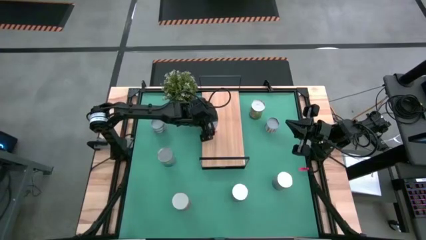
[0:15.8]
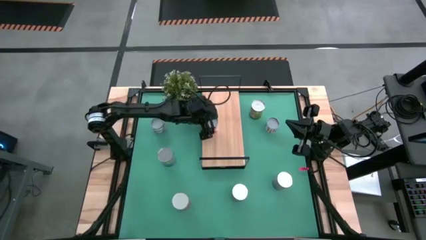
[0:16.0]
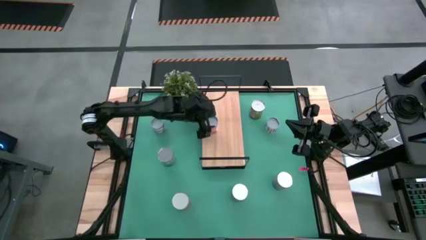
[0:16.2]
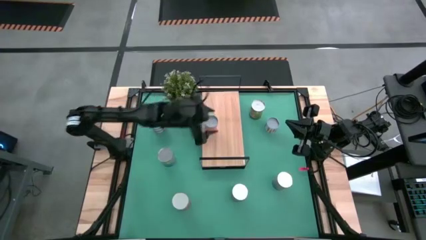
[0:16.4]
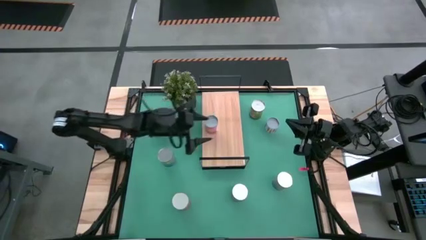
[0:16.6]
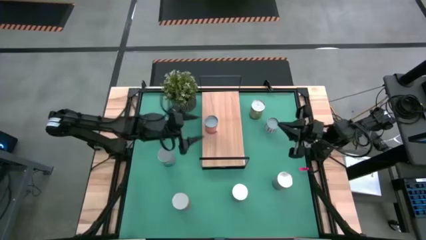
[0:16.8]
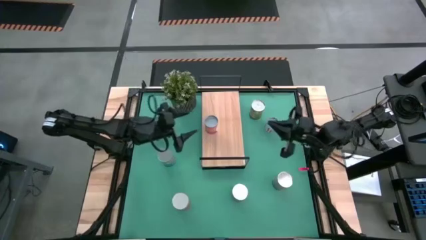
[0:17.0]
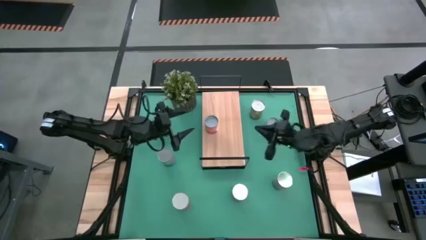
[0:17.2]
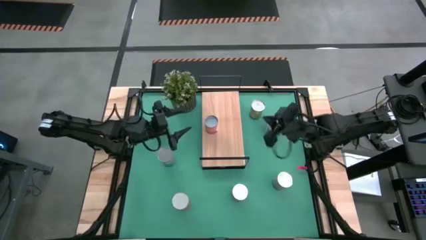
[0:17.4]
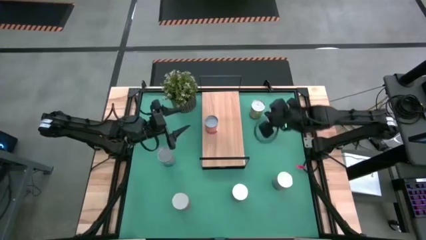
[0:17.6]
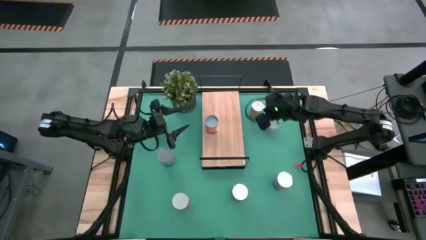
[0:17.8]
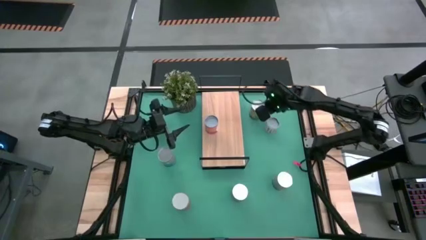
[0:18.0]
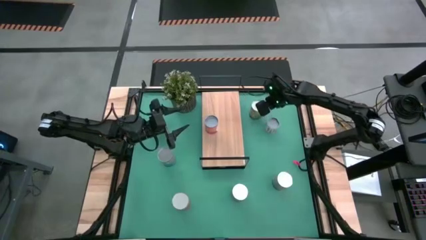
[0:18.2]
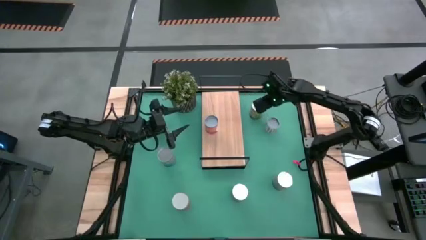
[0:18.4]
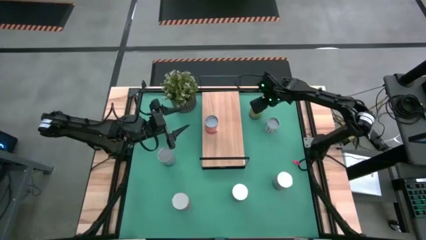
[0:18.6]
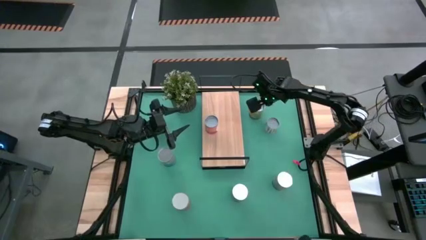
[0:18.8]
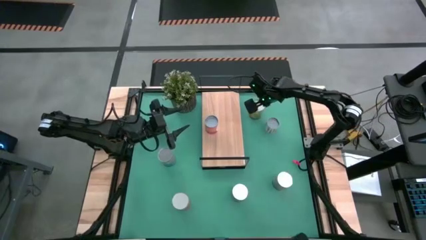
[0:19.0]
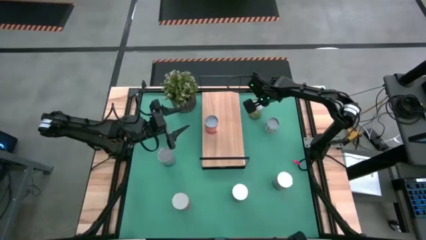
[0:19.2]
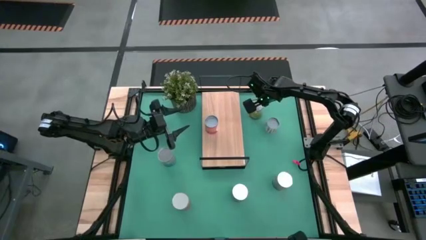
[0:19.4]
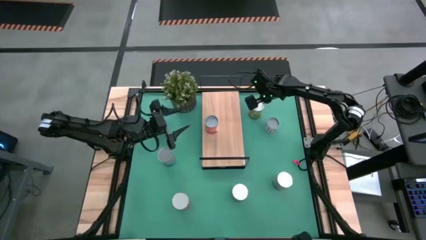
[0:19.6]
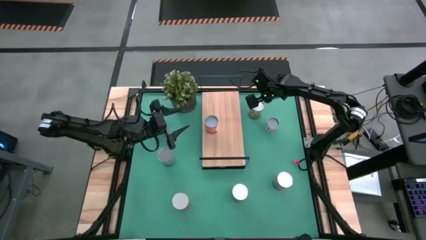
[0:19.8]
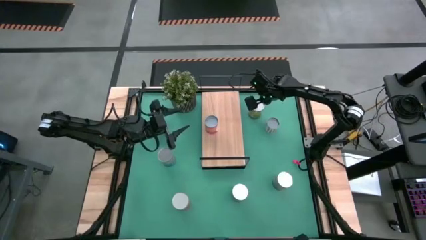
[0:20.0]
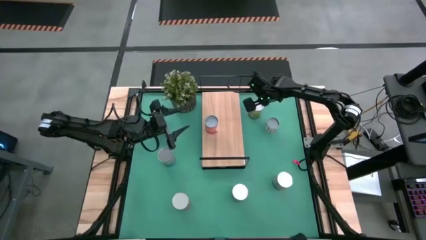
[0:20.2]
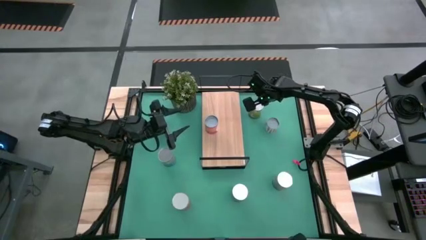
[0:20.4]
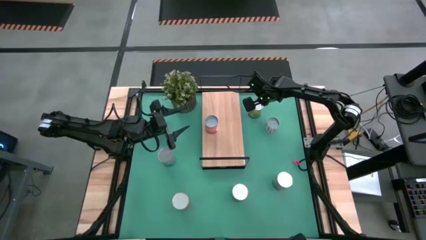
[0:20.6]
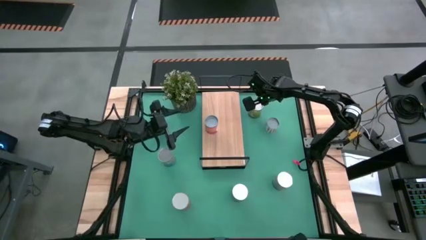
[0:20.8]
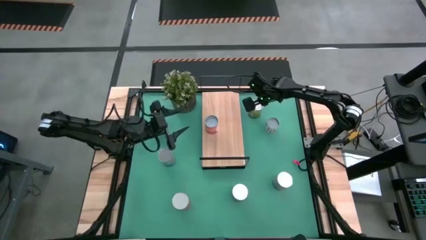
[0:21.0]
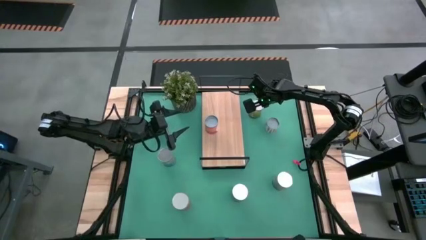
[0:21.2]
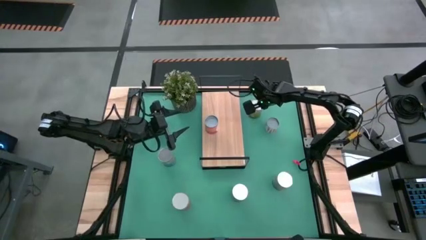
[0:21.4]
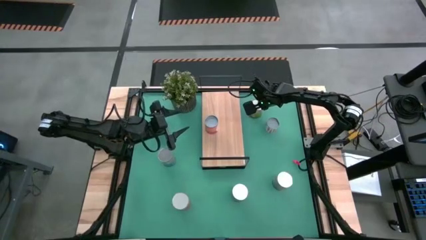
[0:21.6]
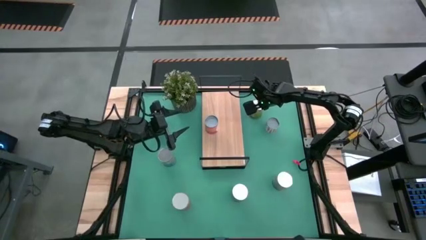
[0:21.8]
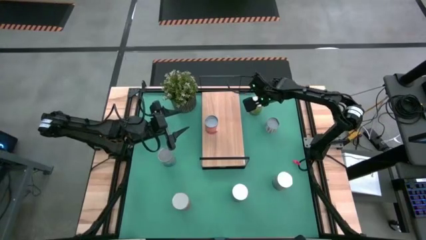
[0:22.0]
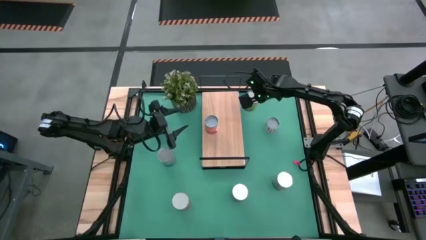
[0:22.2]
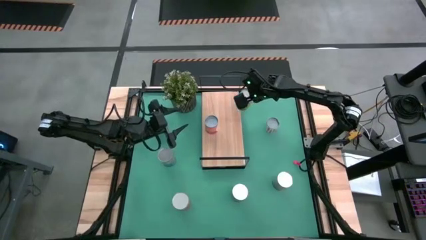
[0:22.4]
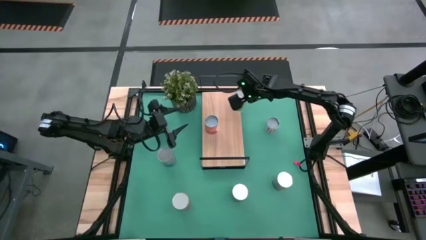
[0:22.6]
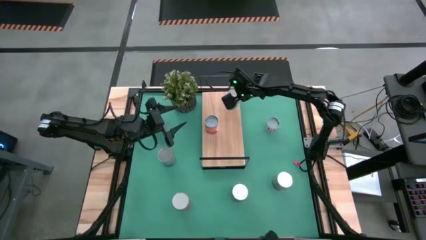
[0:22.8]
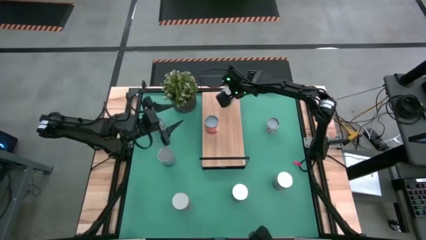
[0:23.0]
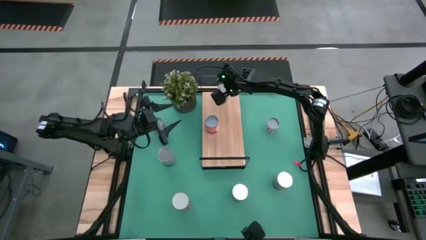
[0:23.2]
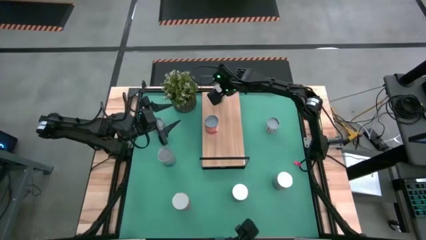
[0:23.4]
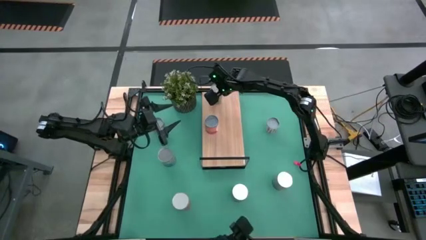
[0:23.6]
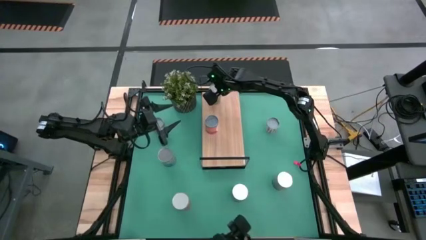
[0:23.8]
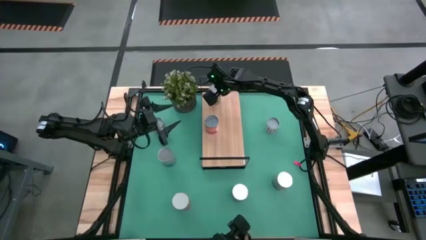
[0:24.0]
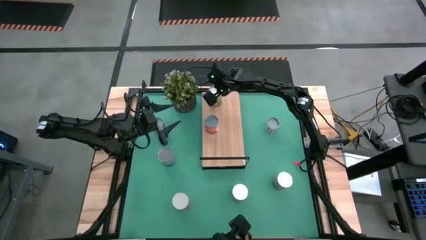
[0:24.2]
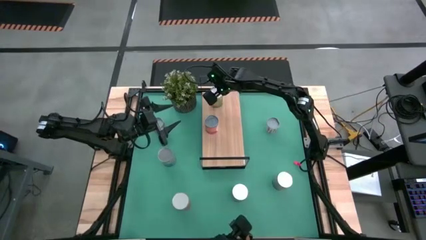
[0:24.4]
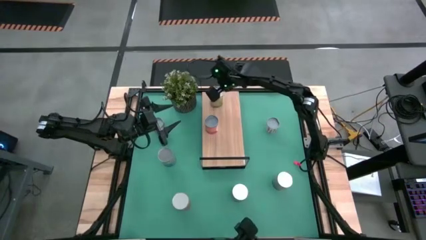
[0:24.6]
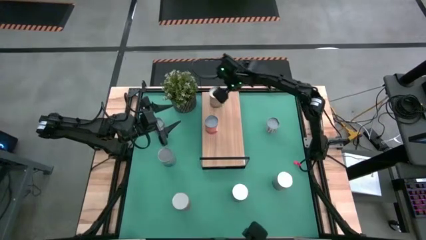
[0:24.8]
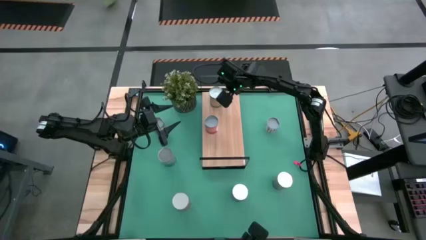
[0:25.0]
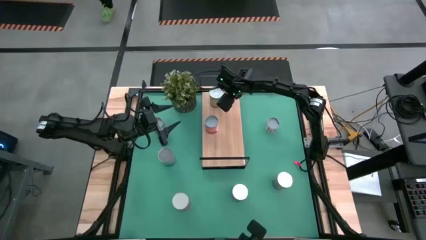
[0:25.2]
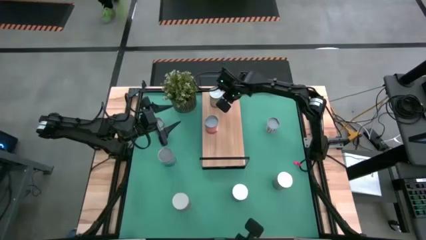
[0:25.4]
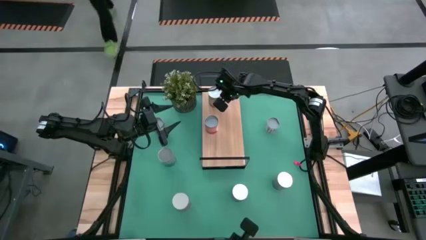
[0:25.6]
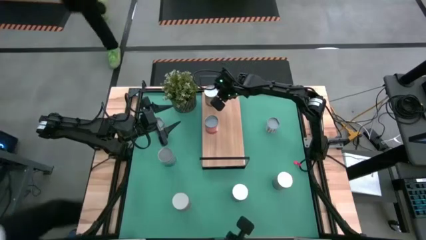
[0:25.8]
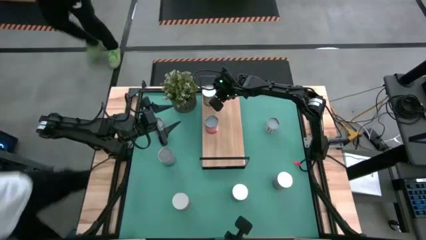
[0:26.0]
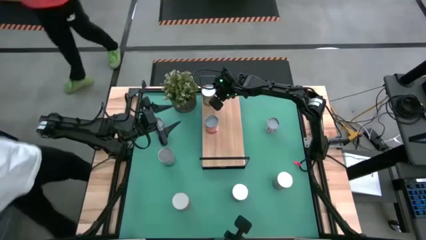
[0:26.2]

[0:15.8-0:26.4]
Task: Pick and place cans onto a shelf
Put the canned mangos on the shelf

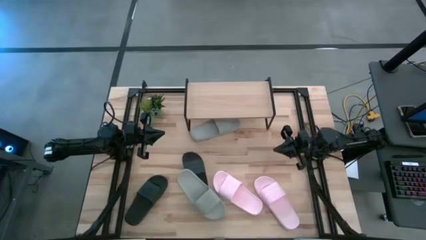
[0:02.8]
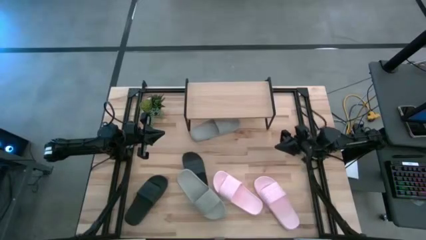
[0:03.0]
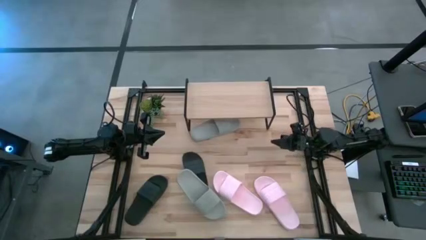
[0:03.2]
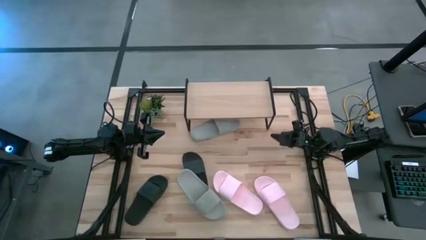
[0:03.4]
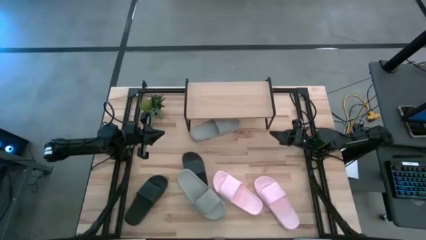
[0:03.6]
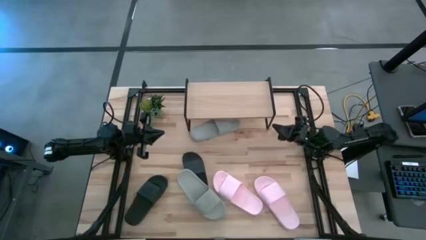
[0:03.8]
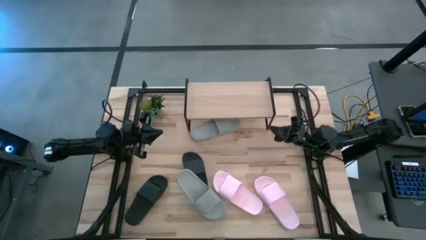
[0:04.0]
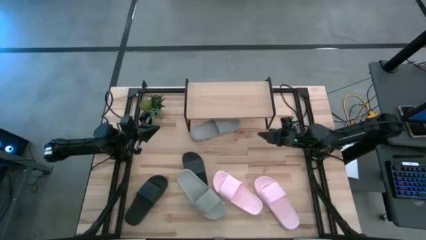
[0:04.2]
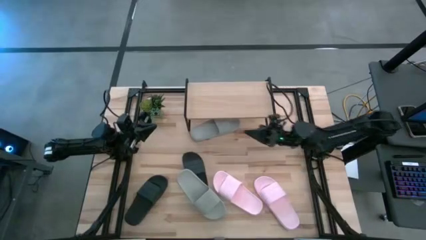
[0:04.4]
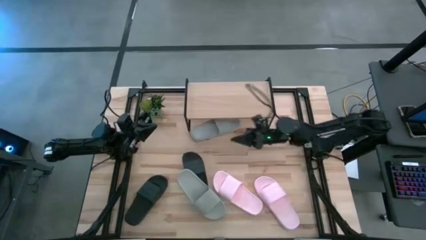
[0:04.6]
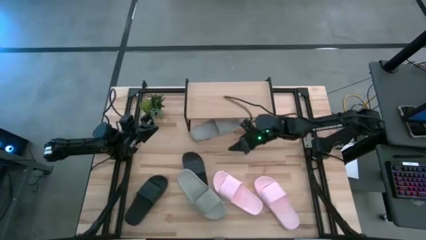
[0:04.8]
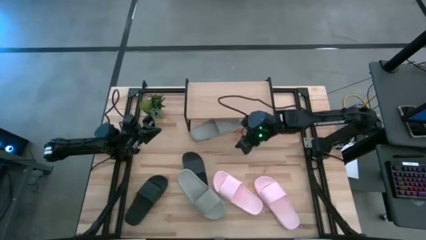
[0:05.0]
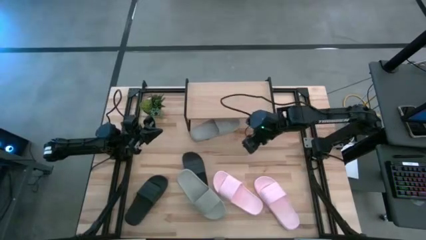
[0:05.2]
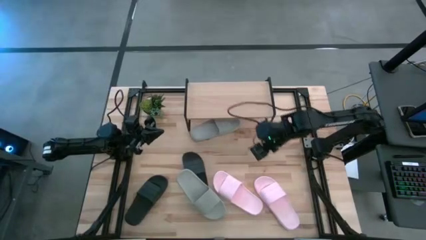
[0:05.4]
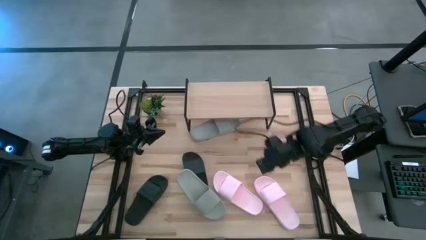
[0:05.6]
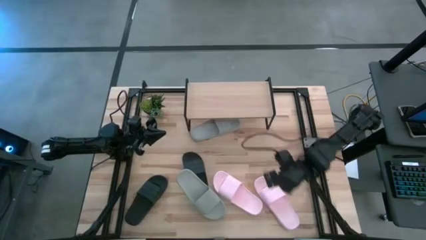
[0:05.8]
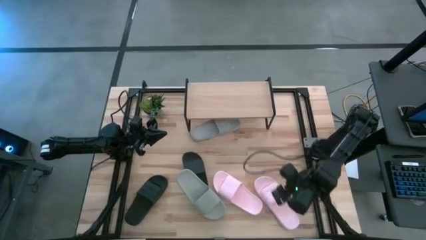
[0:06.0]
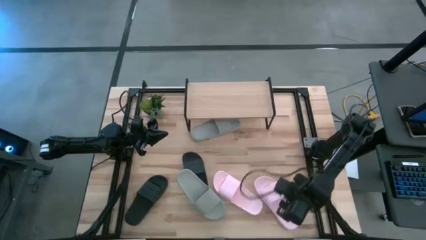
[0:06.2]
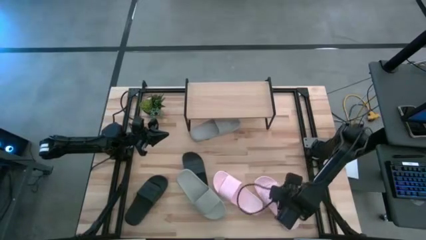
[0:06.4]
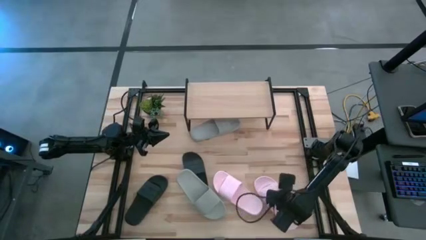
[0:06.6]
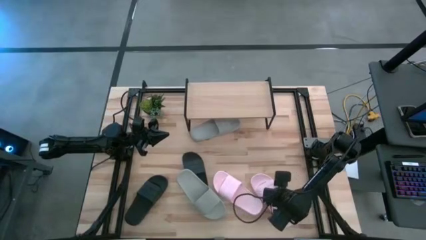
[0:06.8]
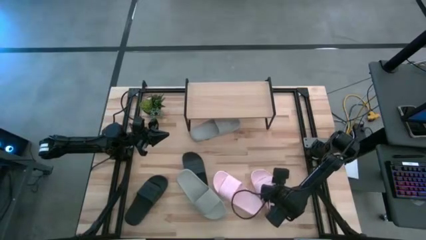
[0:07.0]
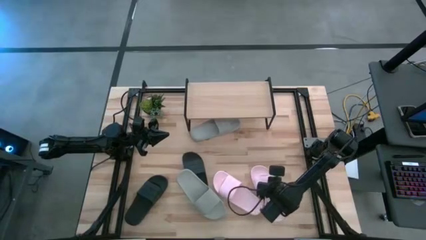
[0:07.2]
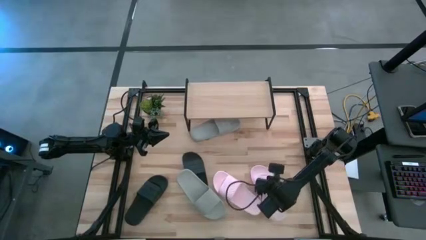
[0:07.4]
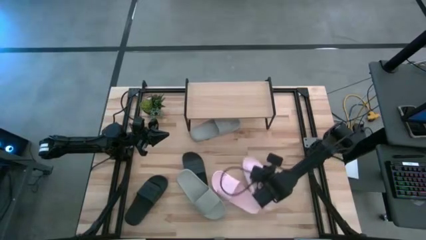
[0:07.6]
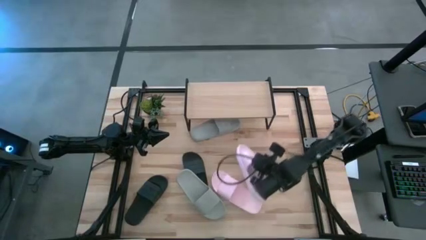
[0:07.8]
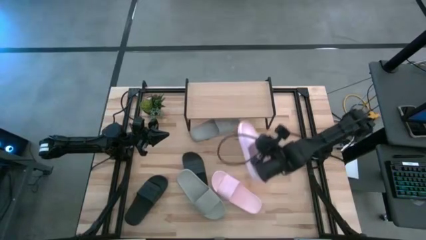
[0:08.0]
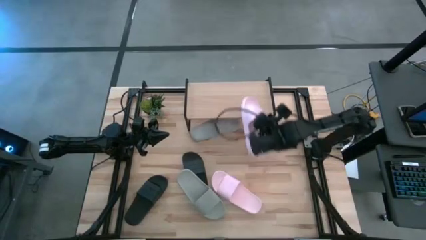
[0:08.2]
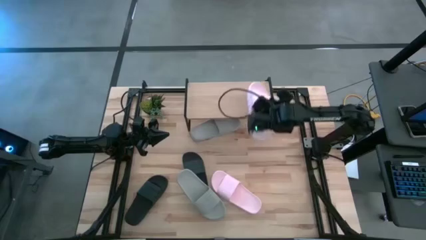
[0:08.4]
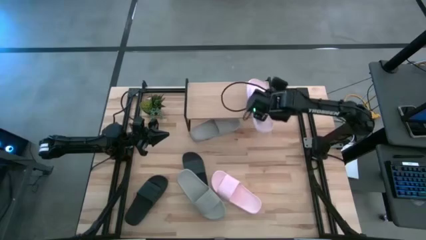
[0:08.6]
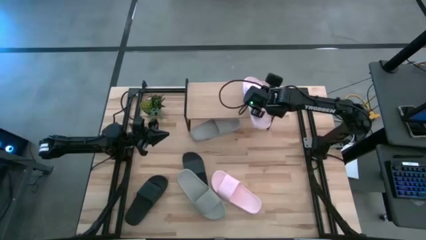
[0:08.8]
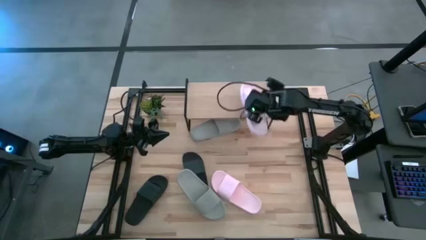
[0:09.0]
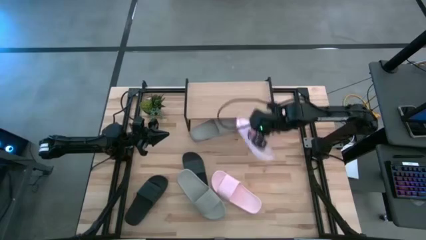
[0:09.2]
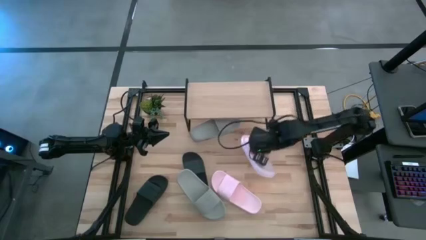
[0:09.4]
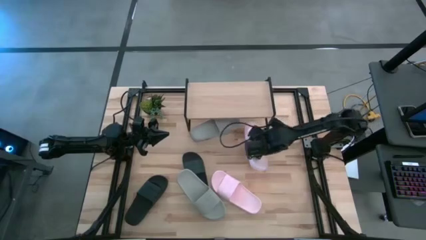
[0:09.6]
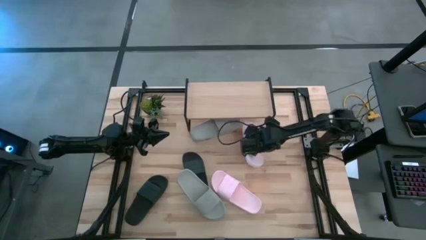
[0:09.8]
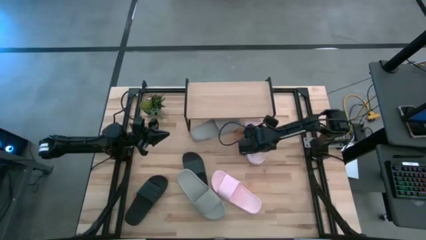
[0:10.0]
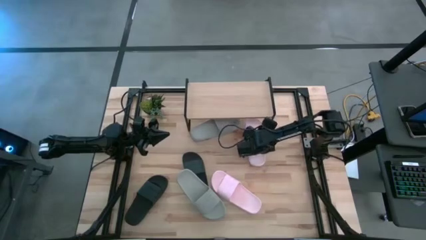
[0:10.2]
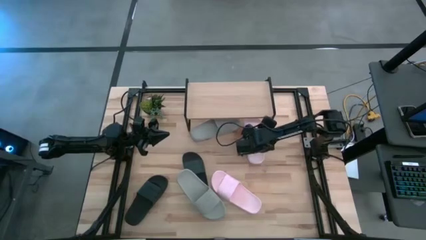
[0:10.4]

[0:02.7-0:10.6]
Task: Pick and place slides into the shelf
Put the right pink slide under the shelf
